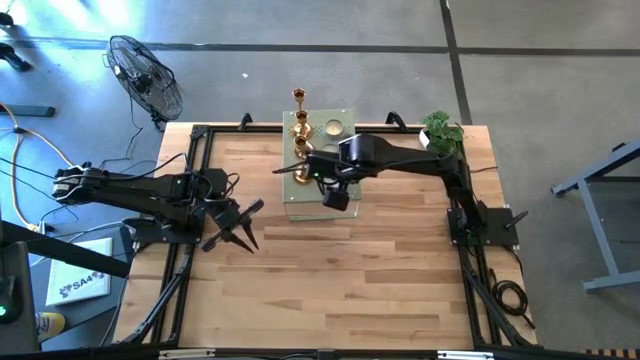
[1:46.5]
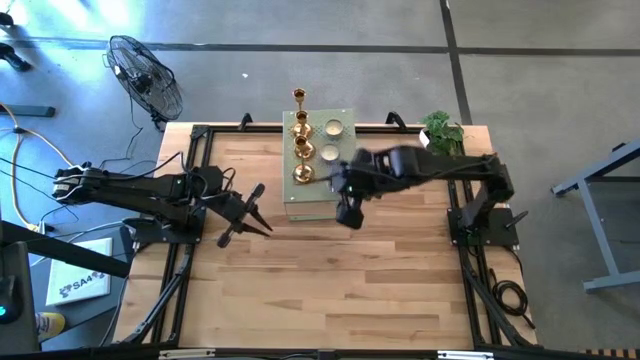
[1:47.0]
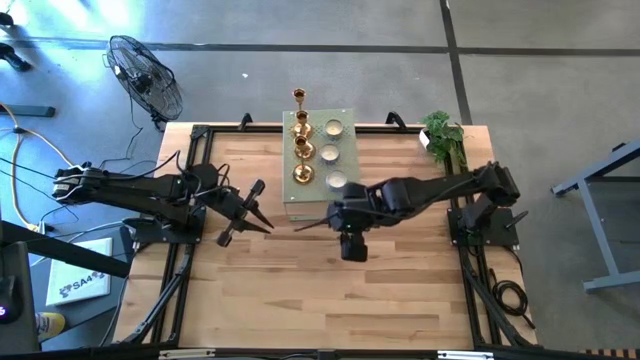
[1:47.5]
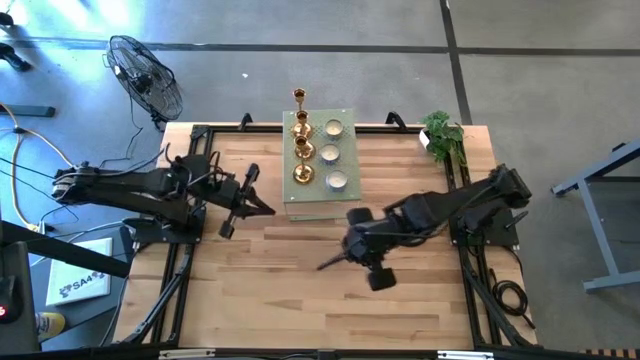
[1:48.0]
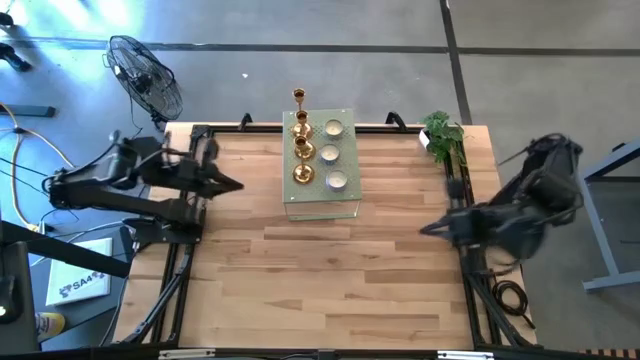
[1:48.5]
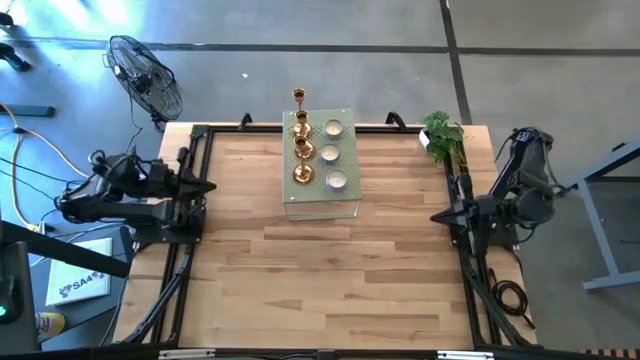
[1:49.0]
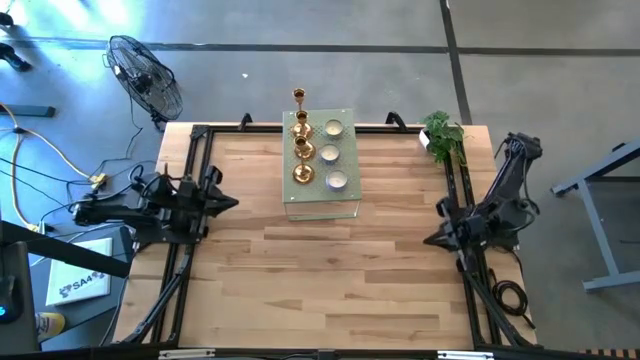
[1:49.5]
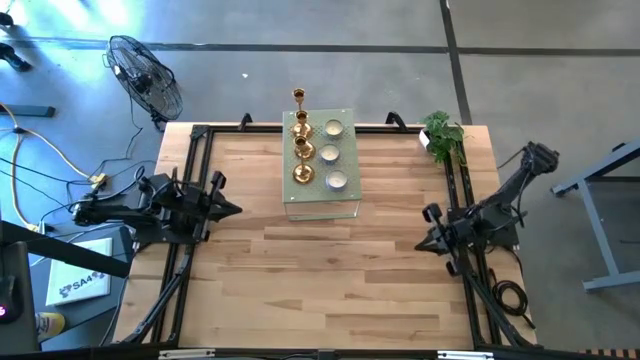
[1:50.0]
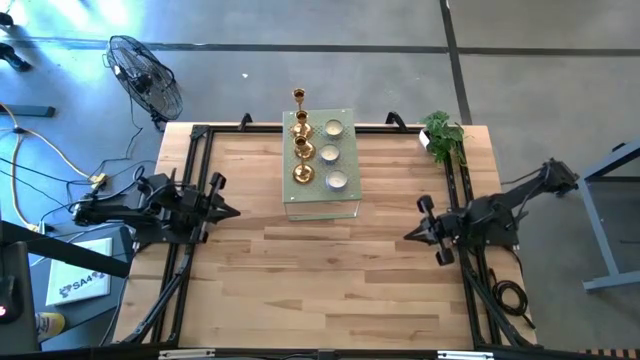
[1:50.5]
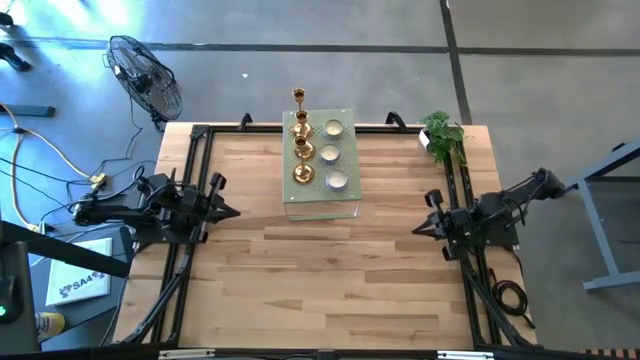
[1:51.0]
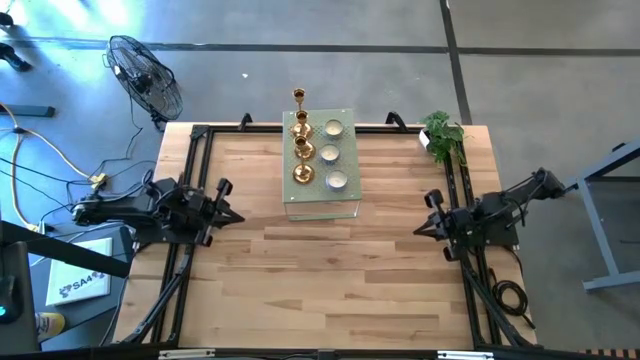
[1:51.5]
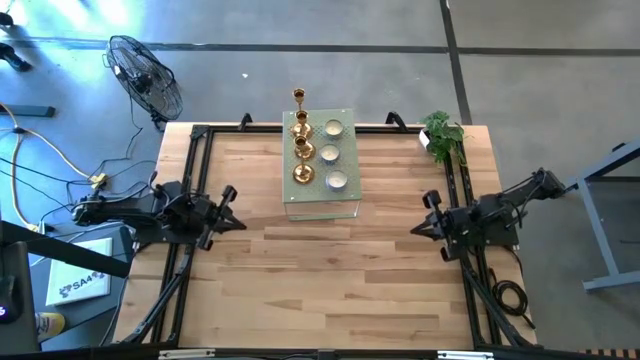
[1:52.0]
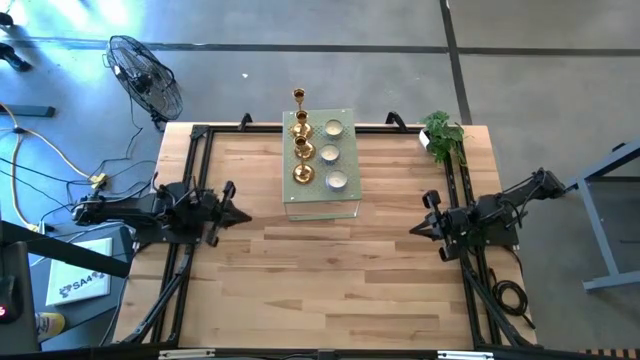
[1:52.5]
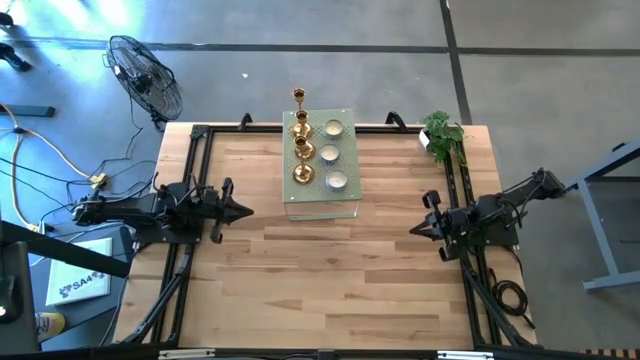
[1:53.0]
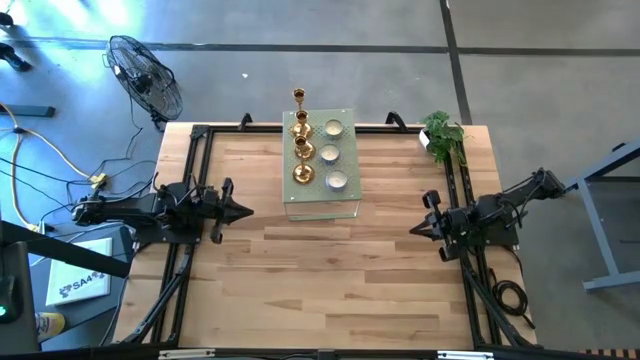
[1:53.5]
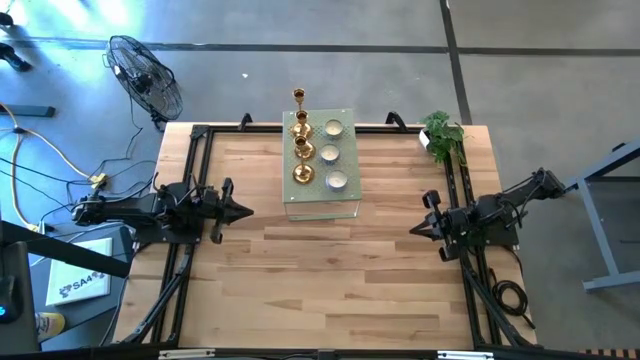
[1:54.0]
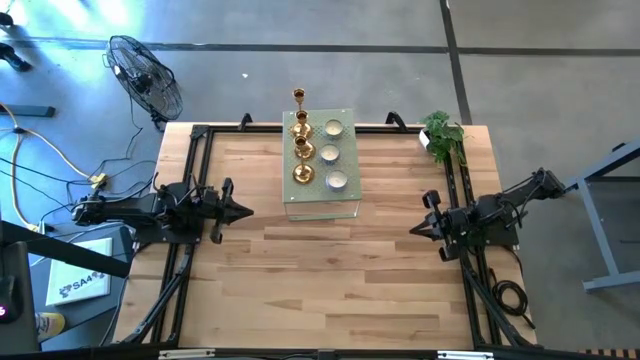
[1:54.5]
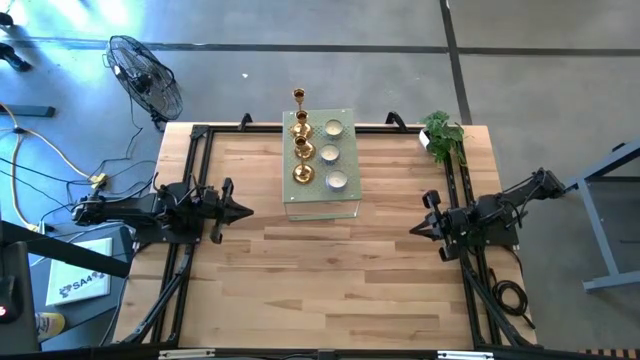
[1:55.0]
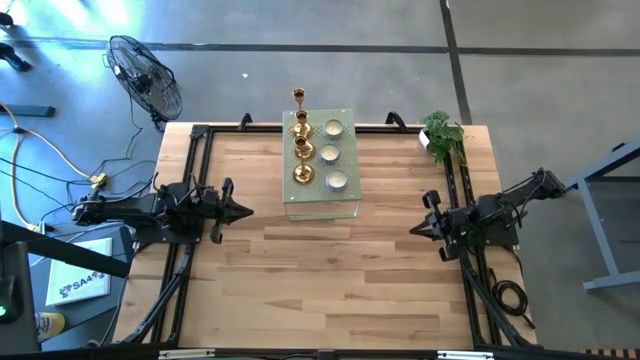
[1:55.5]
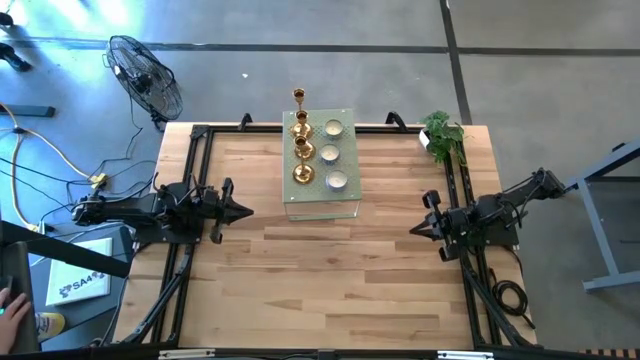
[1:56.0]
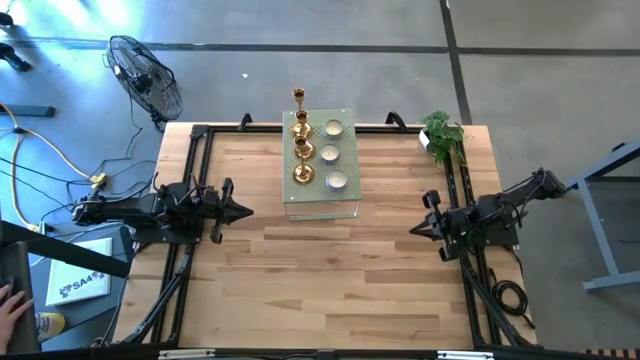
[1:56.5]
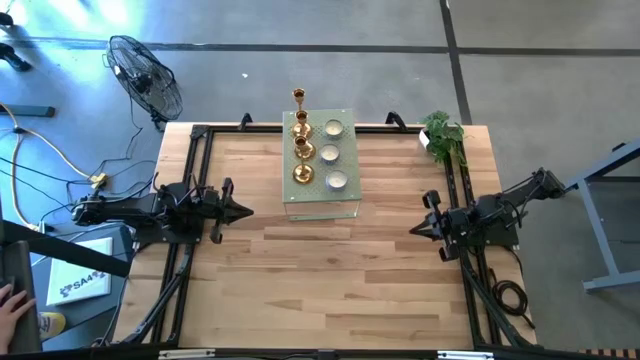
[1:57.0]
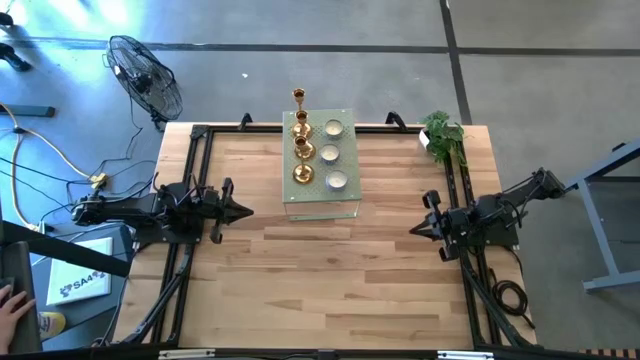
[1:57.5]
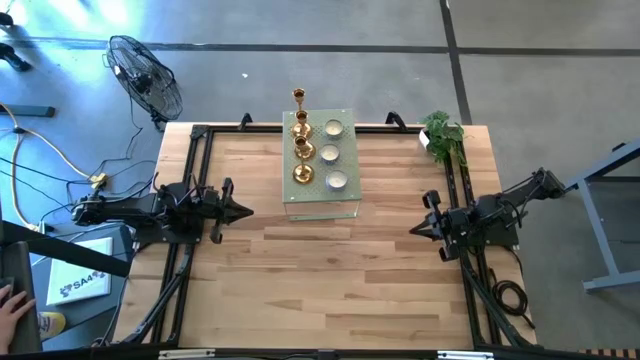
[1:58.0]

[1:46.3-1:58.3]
Task: Pick & Place candle stick holders
Return to Home Position

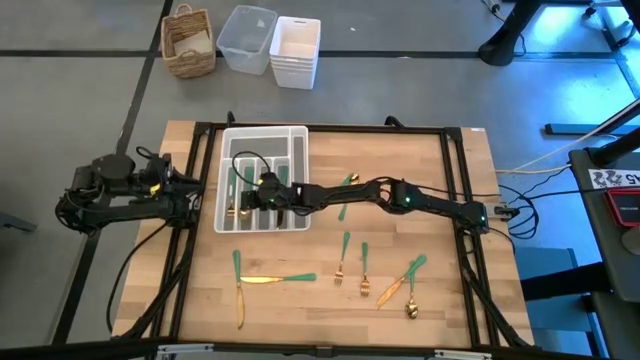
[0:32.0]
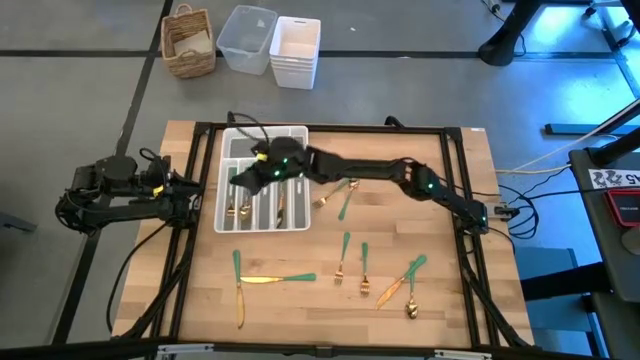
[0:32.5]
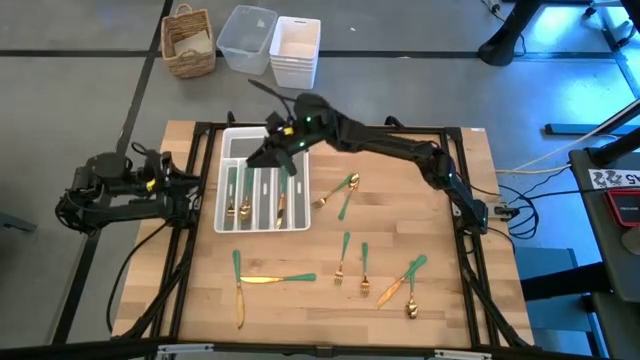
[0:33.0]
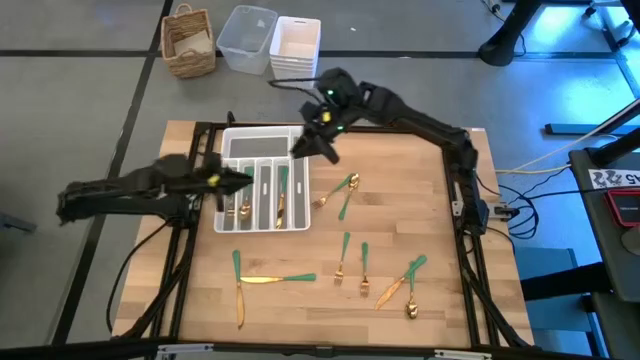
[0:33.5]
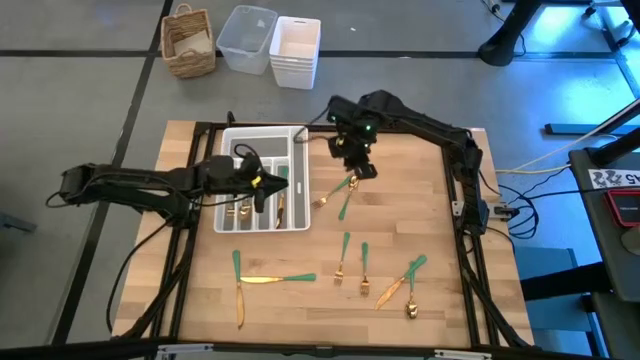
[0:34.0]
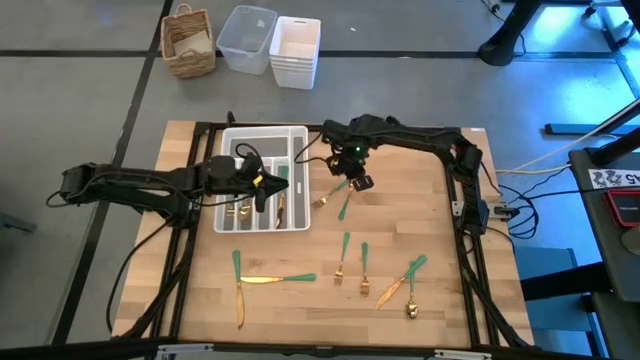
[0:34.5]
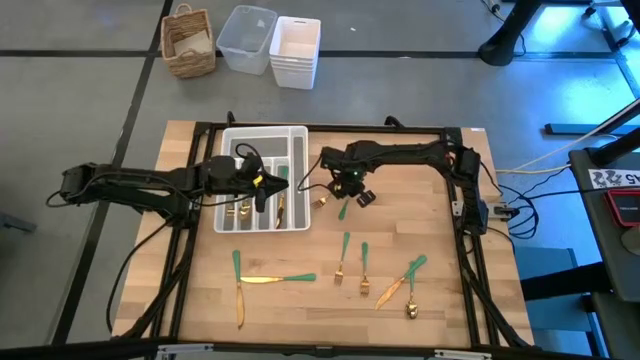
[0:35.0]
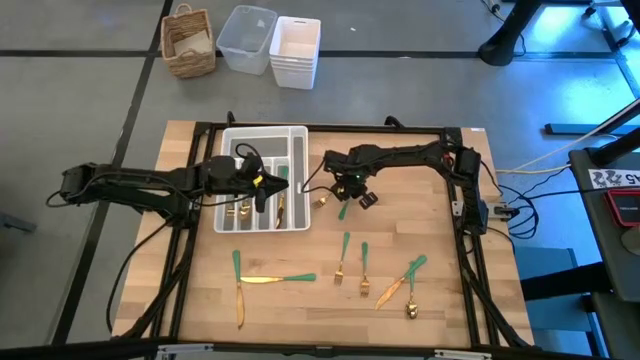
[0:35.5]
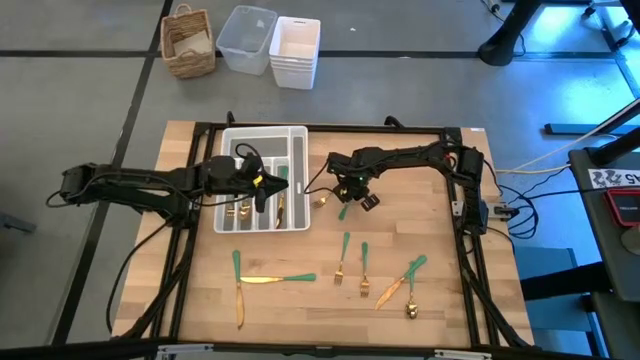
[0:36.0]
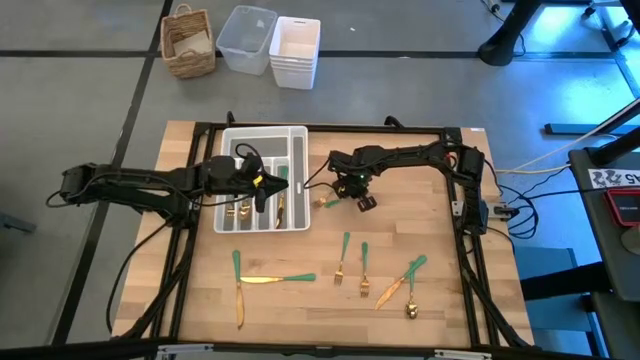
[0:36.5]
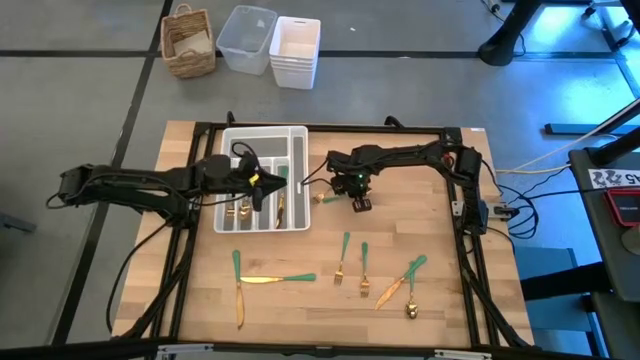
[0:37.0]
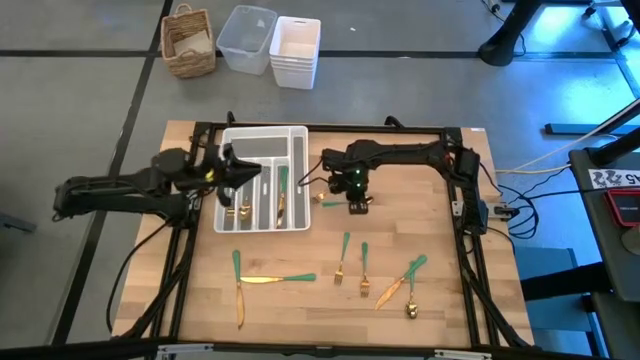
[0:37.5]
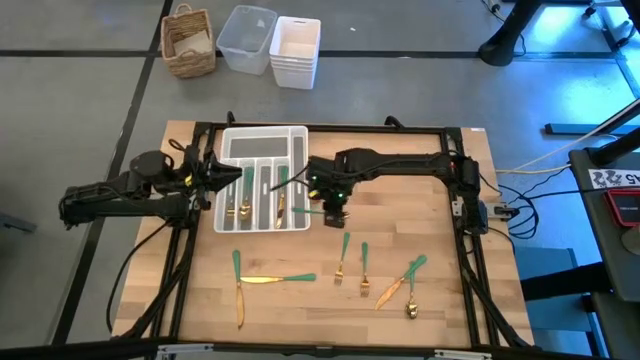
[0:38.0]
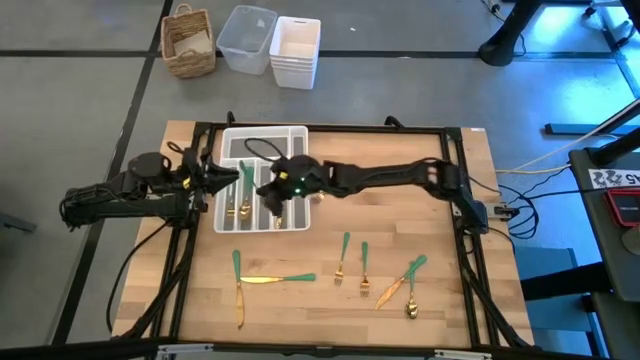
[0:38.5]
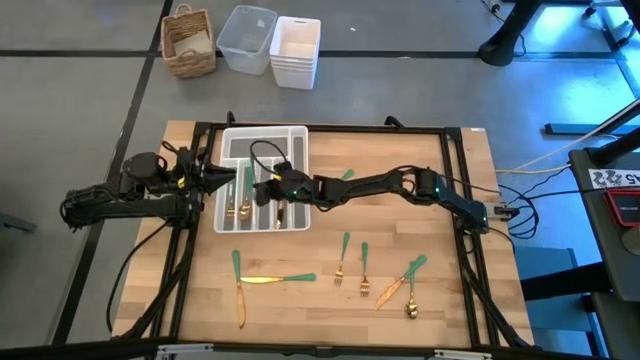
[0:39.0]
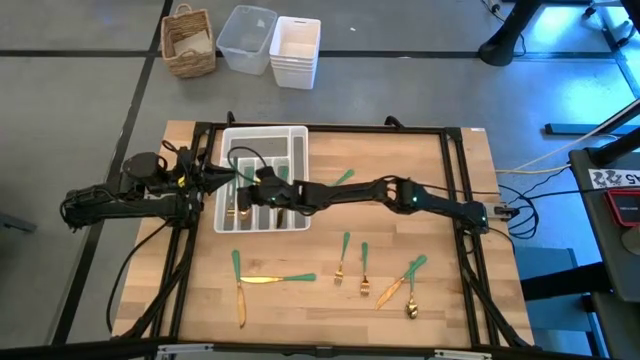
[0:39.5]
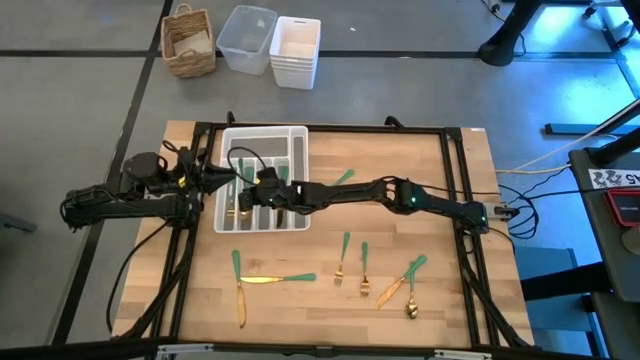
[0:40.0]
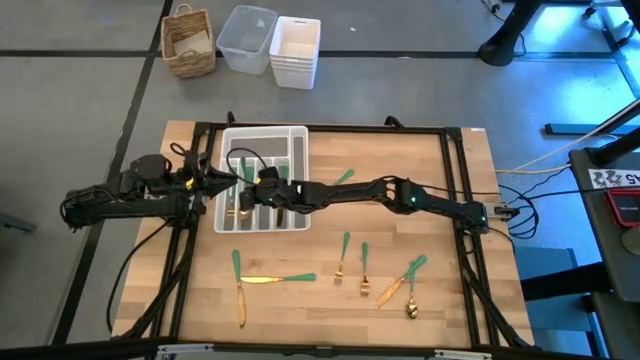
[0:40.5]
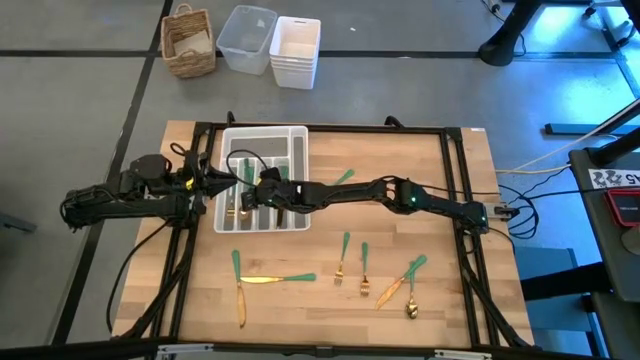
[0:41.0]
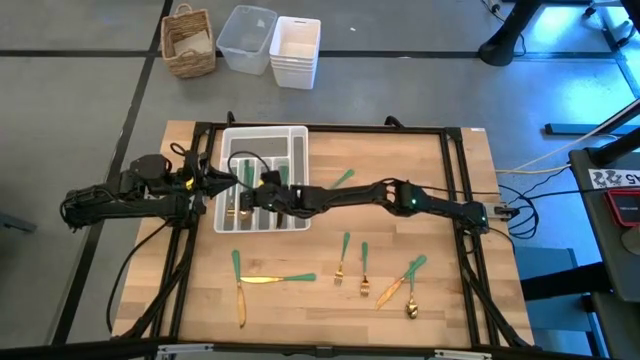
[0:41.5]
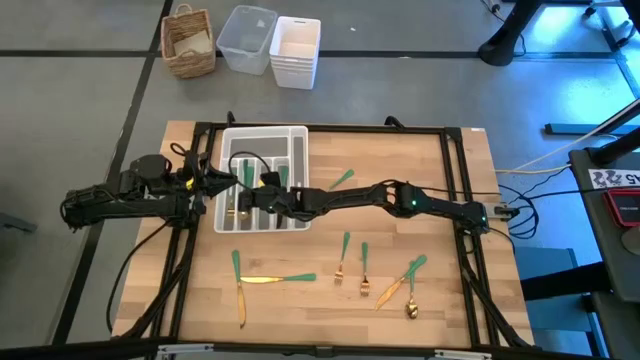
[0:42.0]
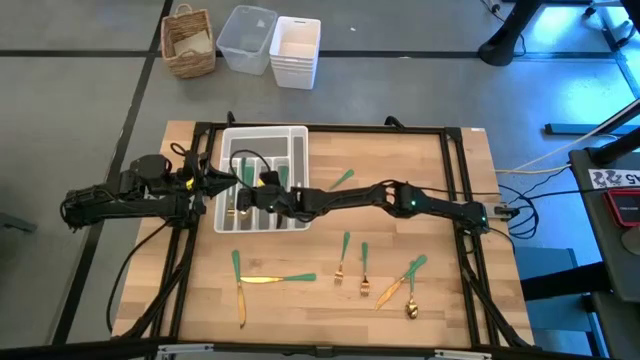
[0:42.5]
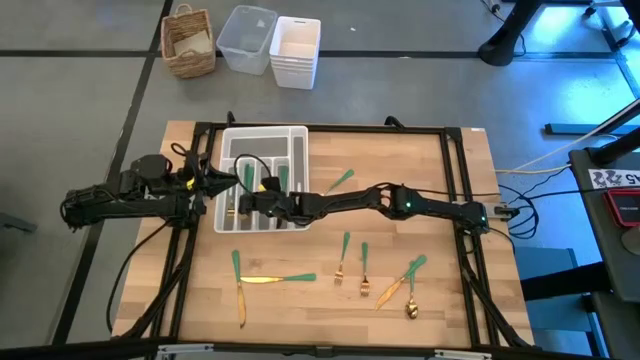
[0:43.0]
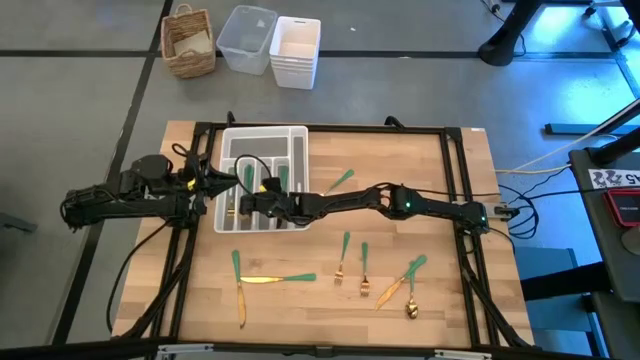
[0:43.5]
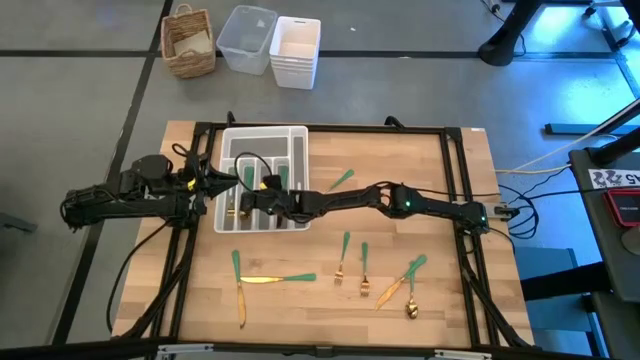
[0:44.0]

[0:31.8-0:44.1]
Task: Sort silverware
Put the green spoon into the white silverware tray
